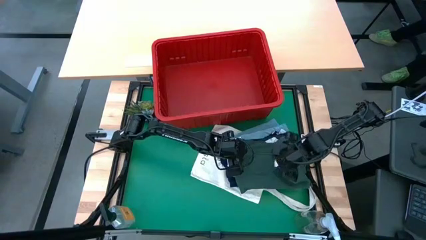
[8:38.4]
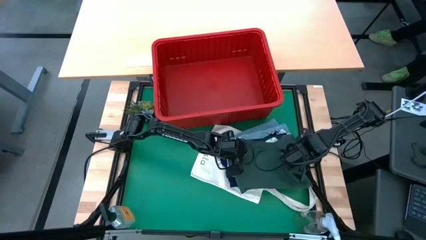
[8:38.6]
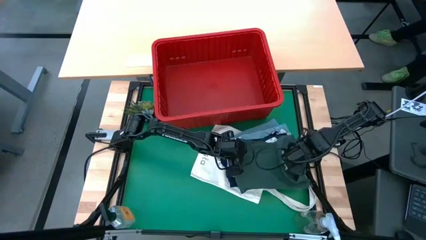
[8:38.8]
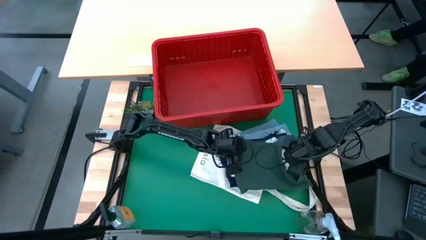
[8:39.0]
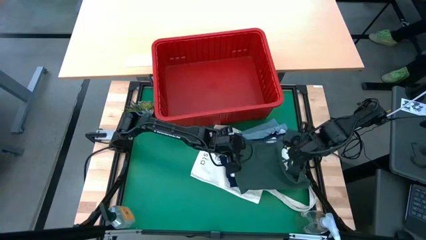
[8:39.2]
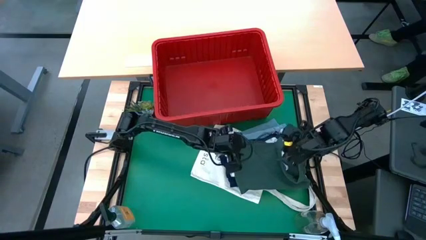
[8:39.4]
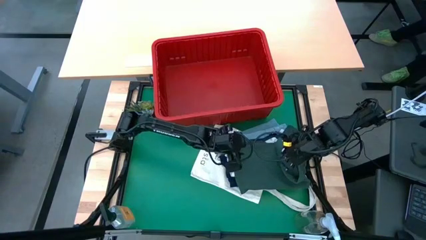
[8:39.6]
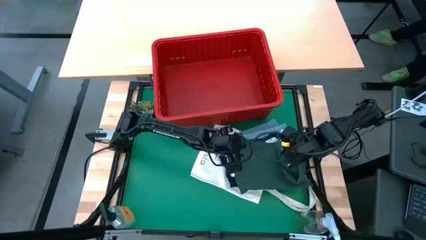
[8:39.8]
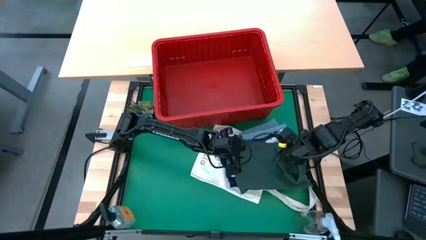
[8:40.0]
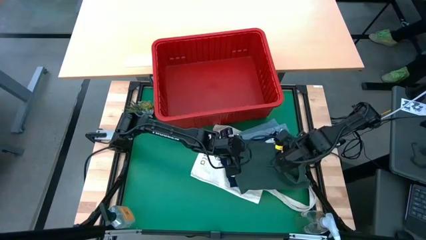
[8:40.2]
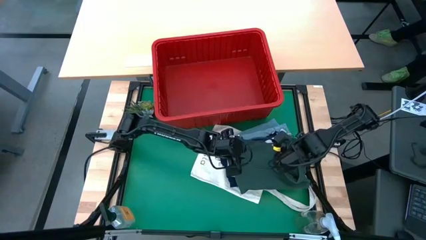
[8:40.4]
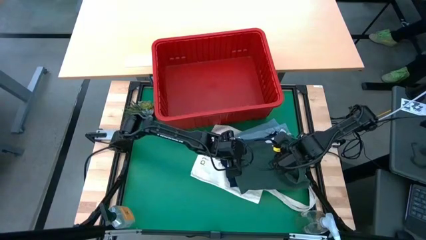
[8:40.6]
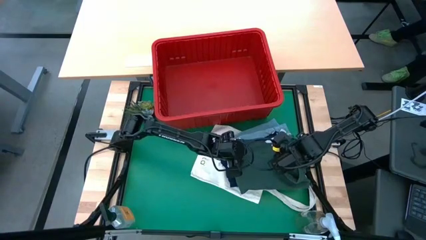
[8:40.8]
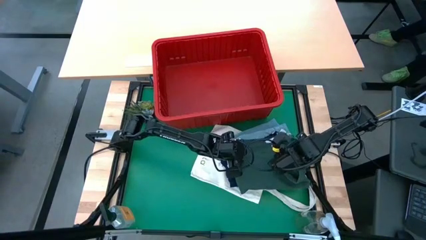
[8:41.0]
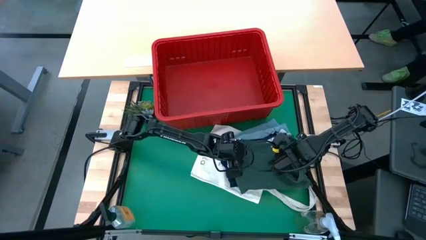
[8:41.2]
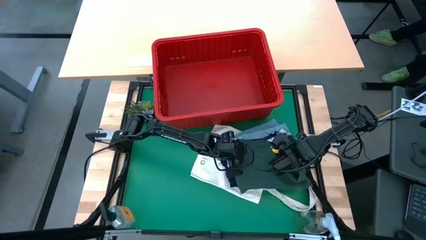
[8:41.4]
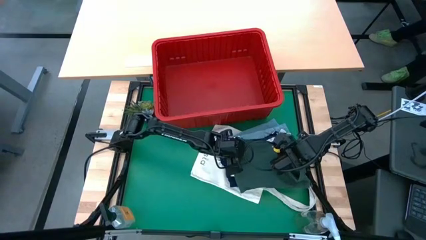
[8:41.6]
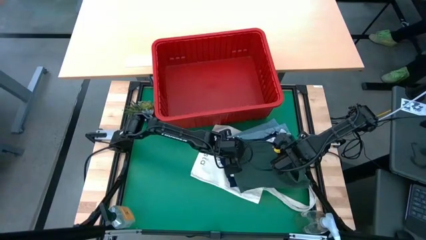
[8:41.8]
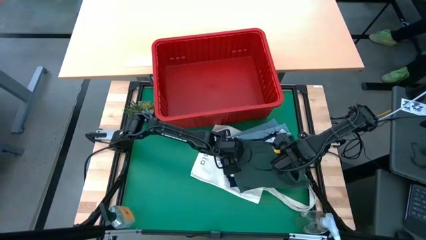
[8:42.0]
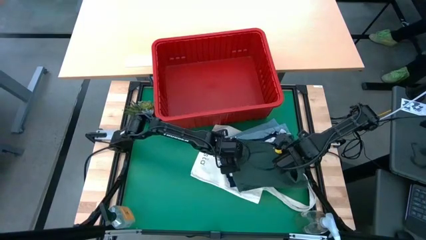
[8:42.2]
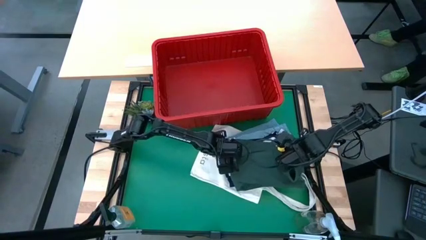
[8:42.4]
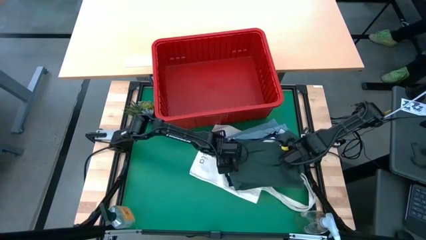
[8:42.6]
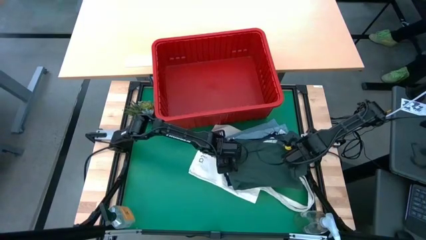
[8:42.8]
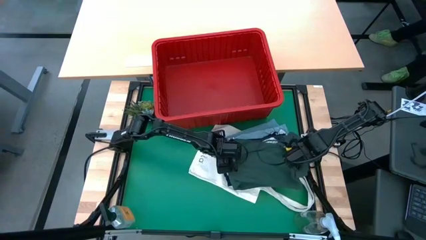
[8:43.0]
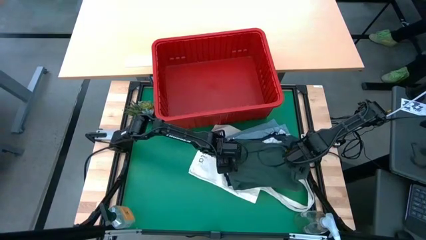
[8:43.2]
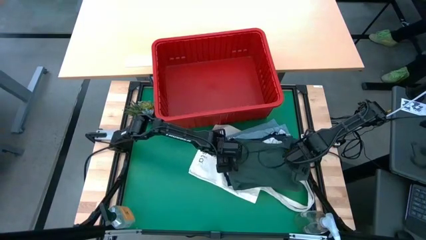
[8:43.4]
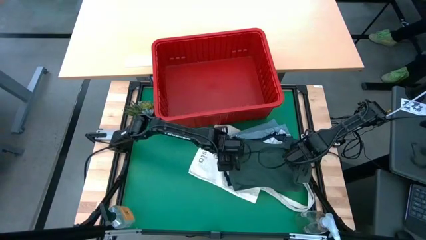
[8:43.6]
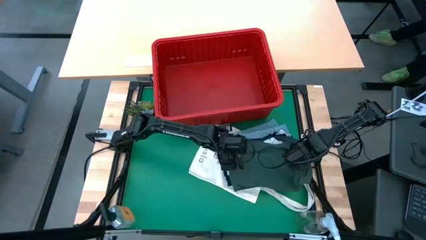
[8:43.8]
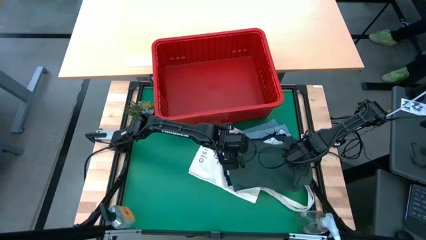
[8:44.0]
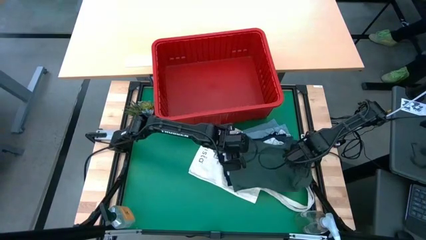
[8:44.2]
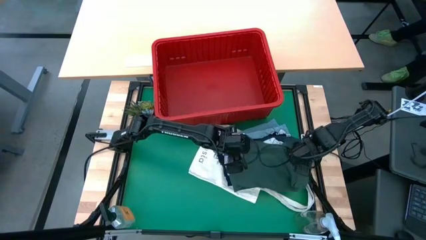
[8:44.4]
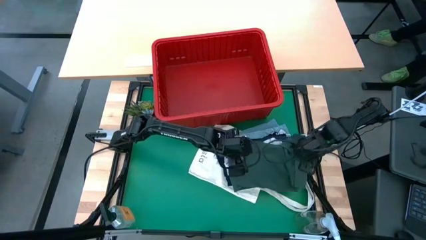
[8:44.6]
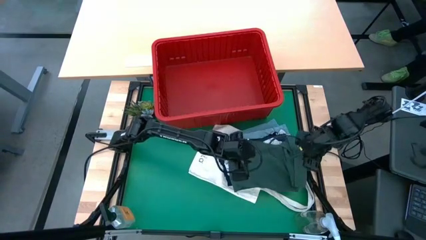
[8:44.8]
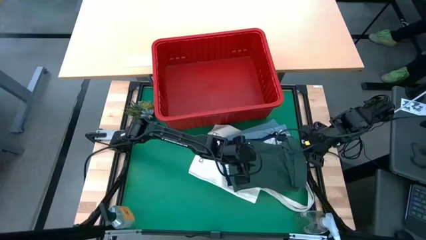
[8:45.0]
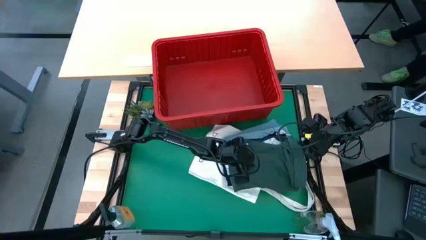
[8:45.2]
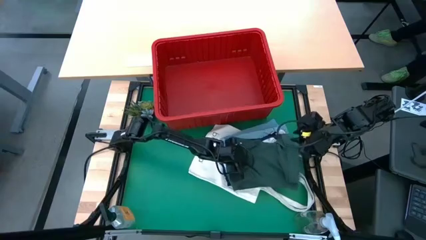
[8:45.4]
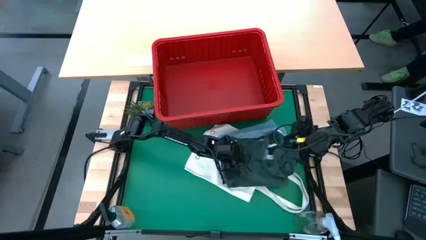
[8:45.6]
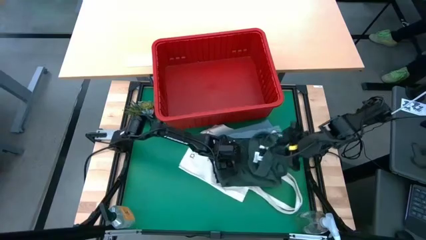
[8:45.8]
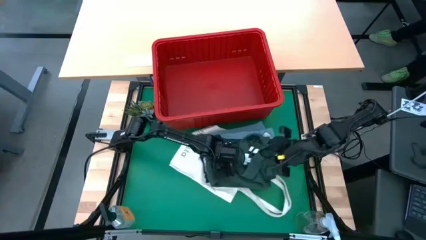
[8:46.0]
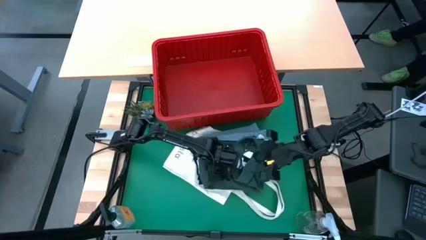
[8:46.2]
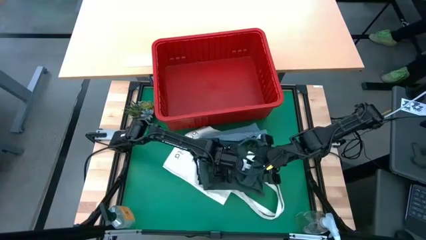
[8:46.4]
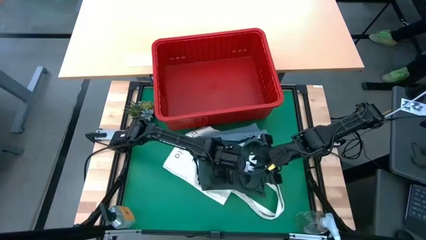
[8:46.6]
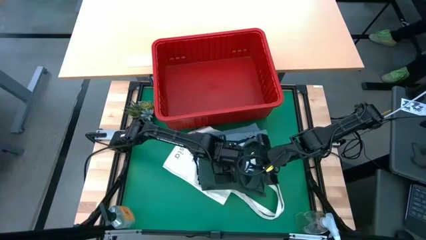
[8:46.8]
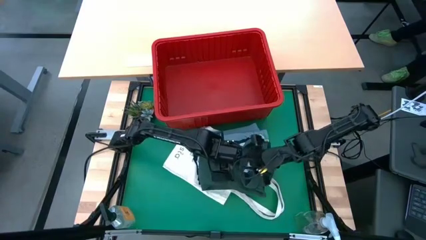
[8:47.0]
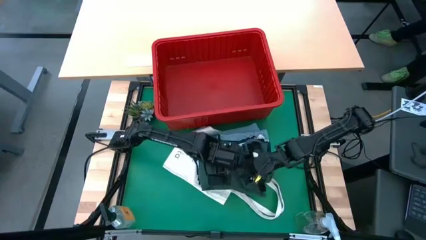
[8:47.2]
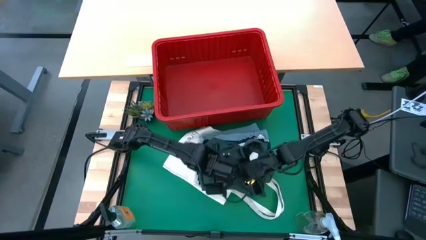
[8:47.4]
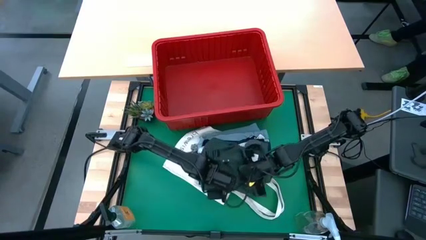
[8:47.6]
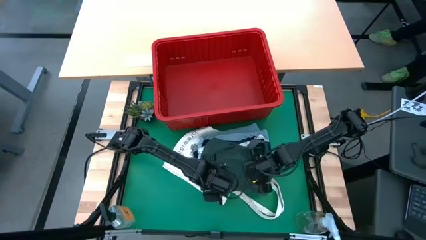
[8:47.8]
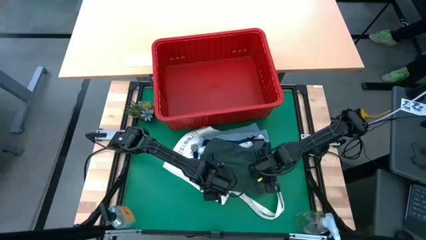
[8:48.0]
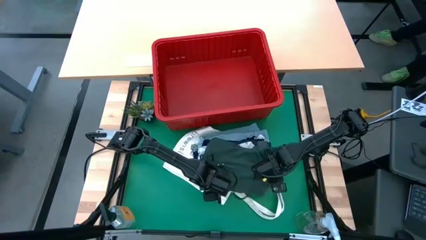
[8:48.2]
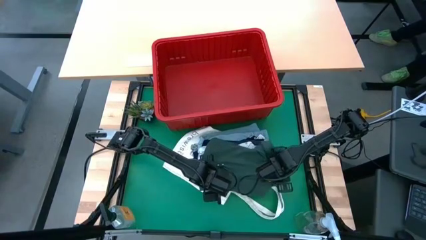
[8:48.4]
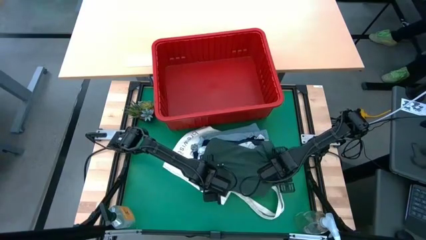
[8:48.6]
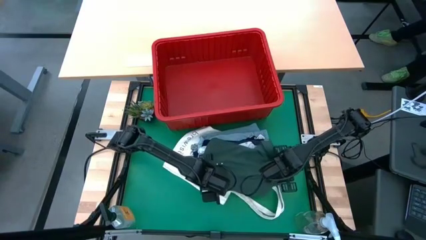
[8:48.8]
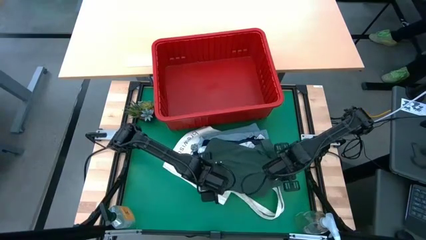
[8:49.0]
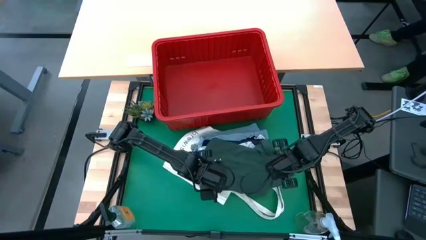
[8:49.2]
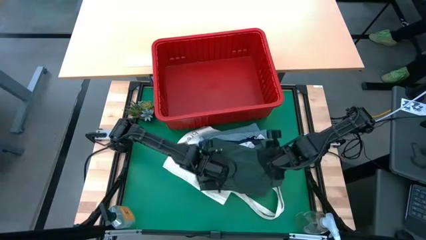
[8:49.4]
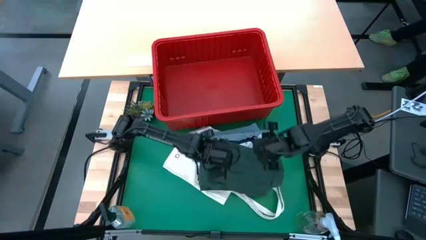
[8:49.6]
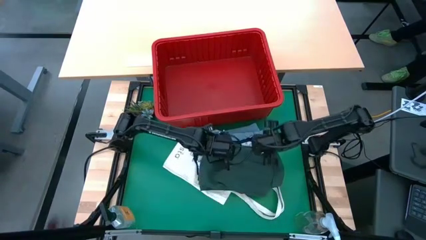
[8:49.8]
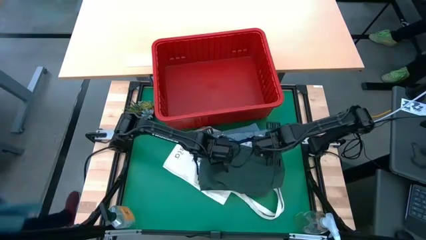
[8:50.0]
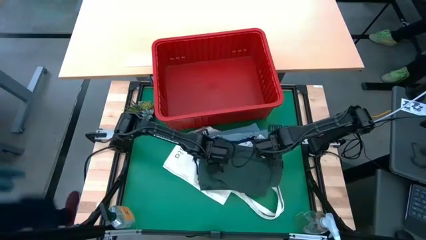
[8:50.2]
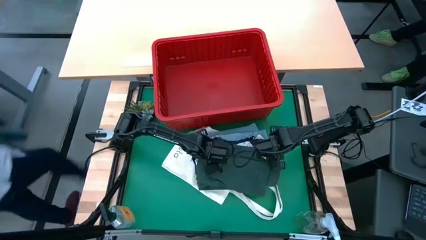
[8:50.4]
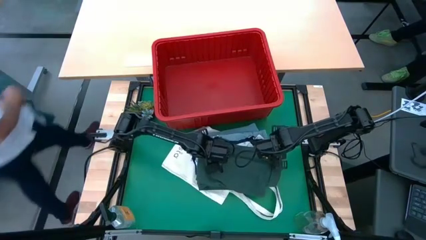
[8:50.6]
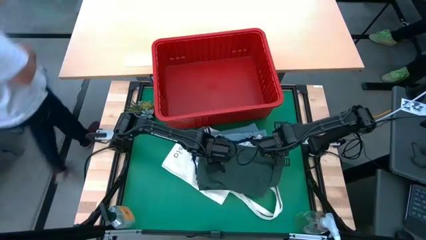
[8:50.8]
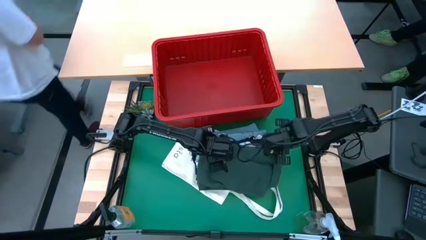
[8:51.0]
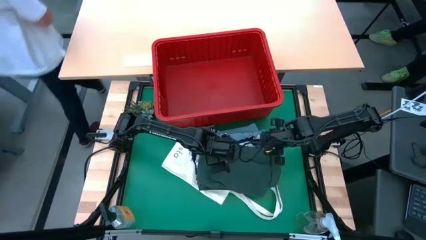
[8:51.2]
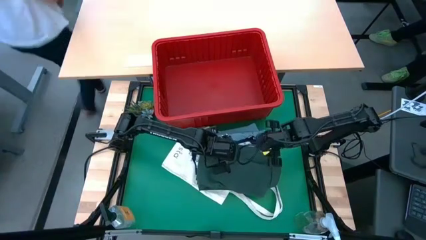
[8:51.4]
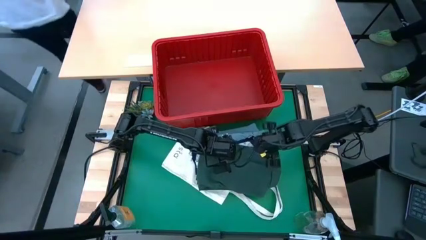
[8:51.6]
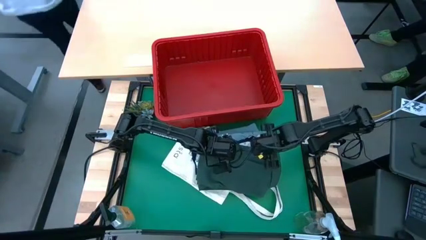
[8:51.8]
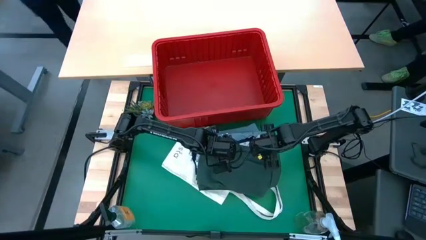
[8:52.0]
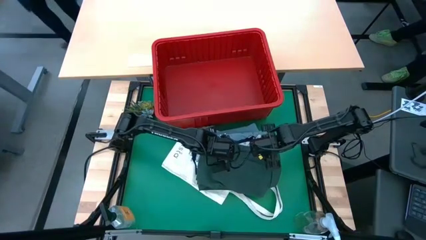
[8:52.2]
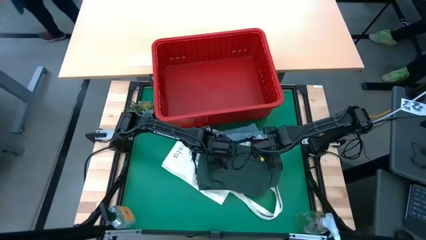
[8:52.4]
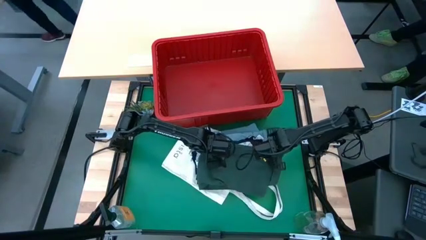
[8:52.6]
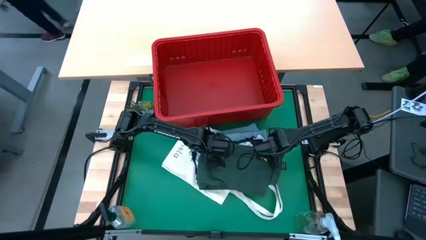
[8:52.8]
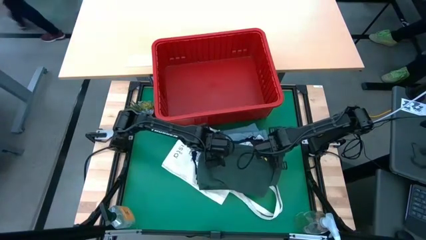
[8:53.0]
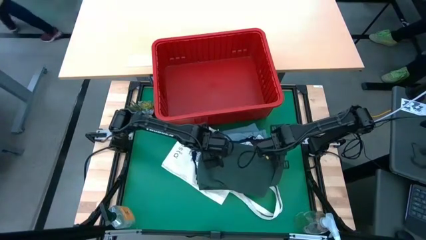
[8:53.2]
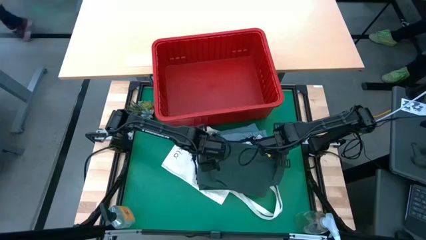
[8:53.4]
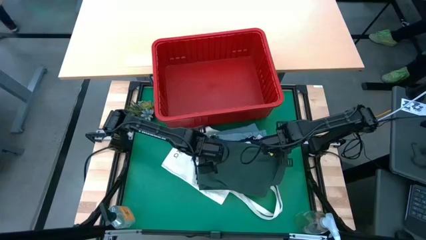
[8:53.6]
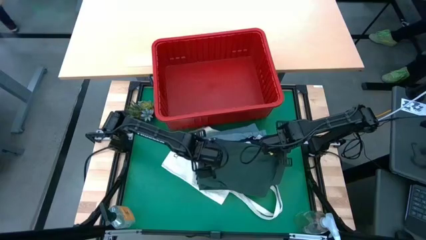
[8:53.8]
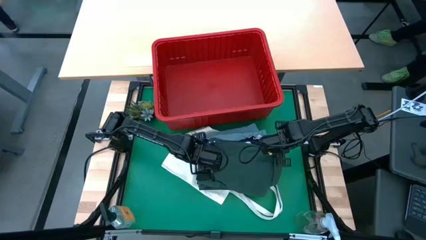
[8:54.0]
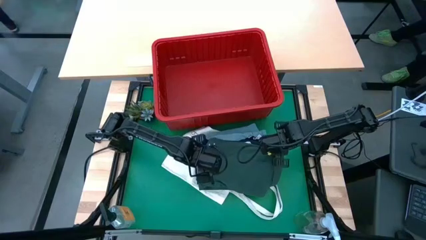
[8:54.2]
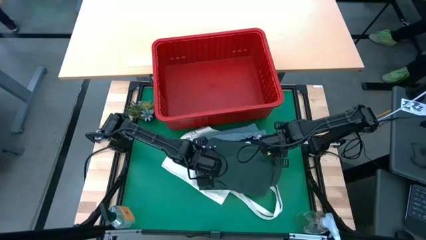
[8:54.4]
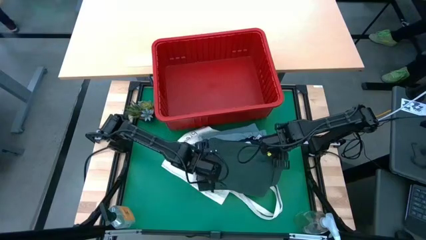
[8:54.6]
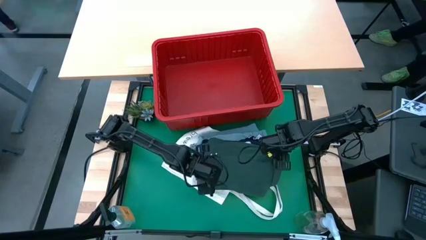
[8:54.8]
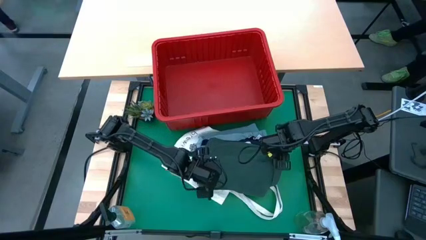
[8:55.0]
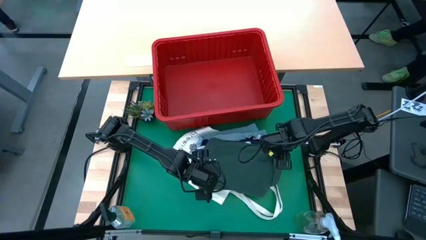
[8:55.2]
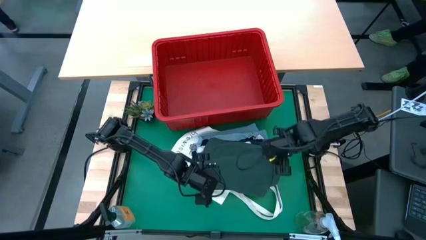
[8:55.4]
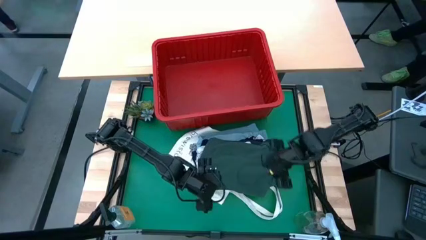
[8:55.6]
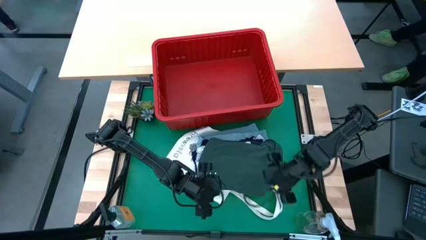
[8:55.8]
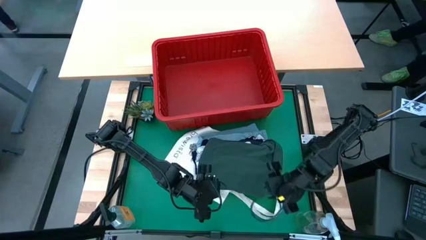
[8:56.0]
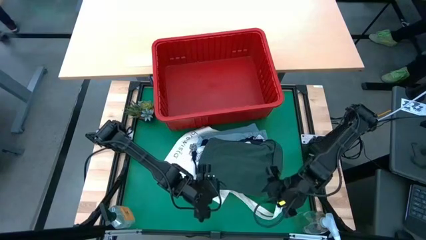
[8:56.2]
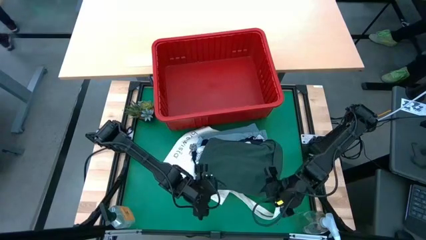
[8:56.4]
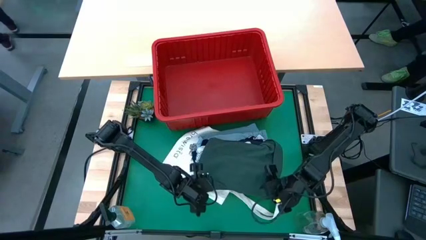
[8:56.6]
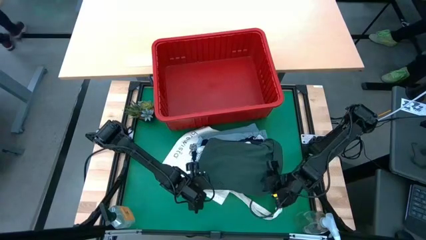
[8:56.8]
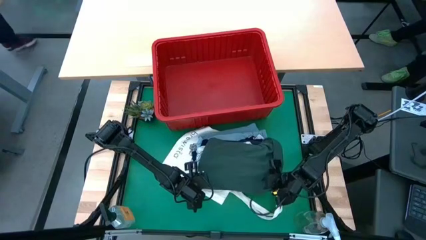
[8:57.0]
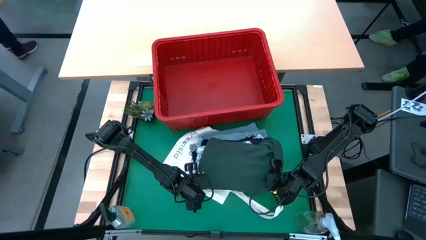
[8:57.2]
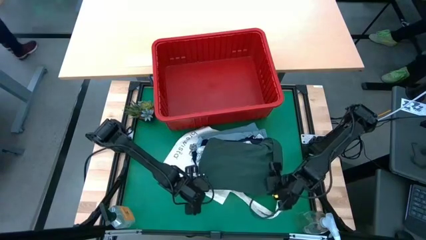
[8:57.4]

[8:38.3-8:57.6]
Task: Fold laundry
Fold the green shirt
